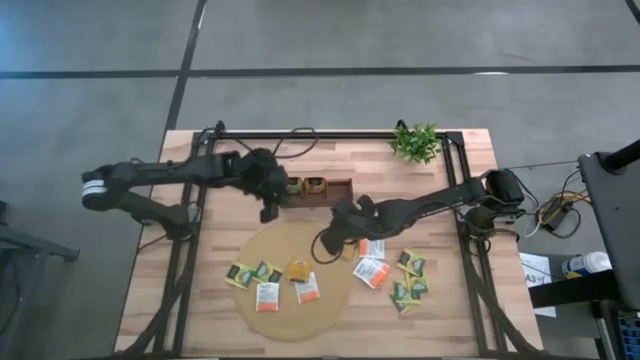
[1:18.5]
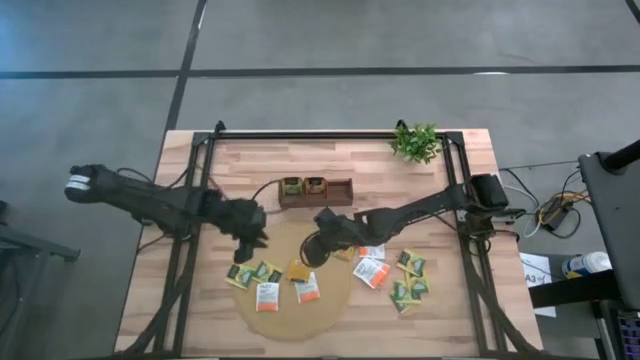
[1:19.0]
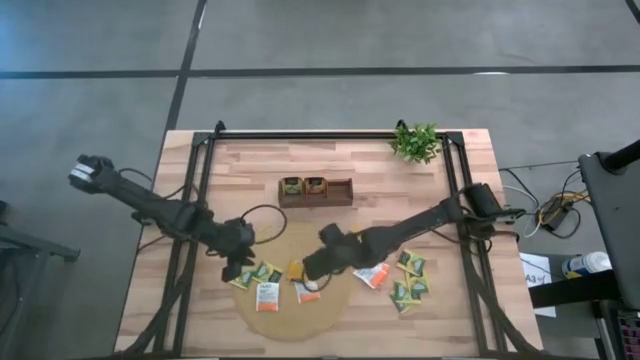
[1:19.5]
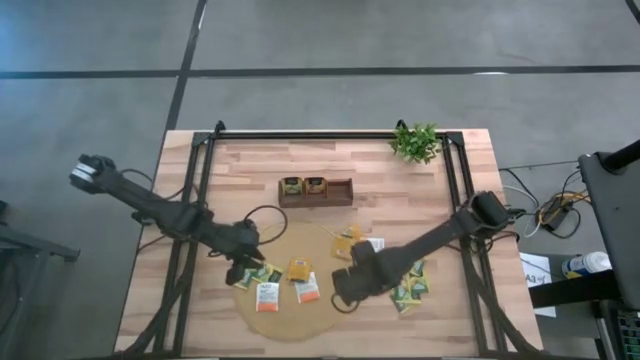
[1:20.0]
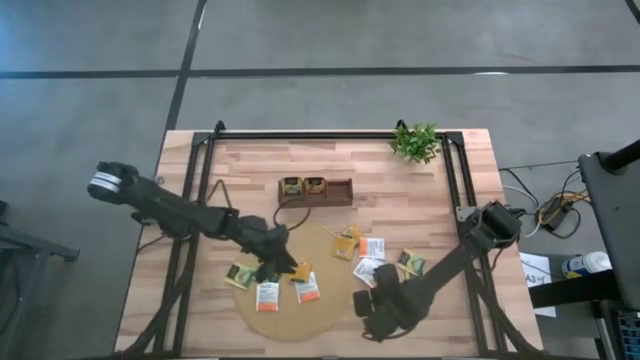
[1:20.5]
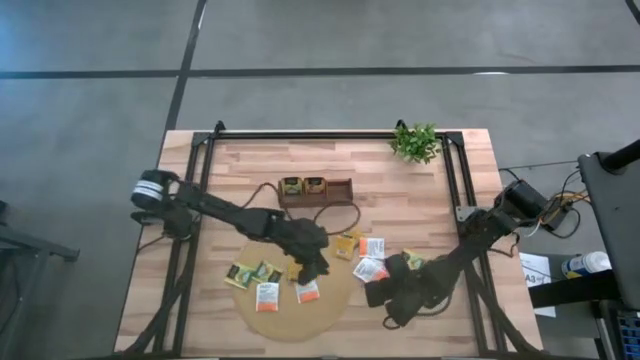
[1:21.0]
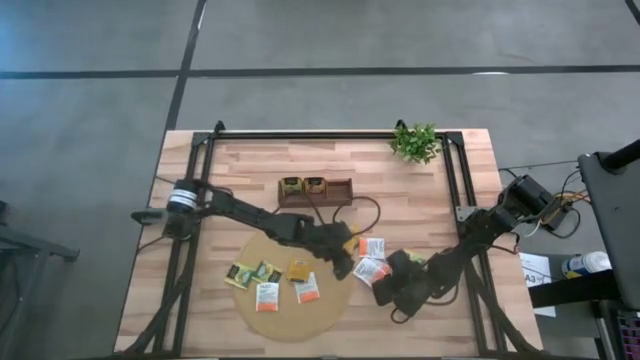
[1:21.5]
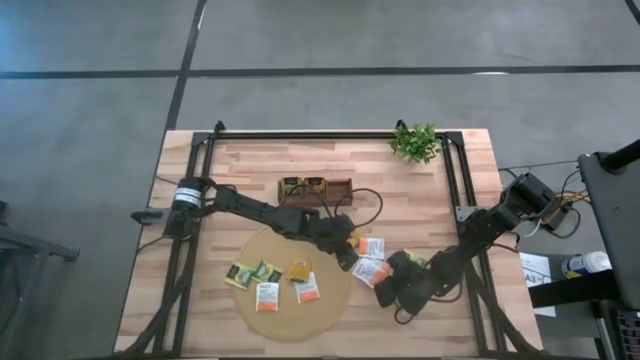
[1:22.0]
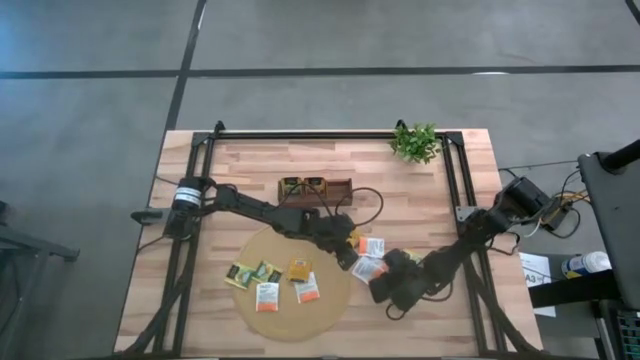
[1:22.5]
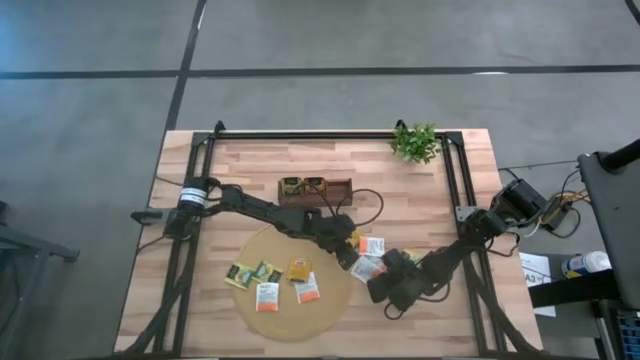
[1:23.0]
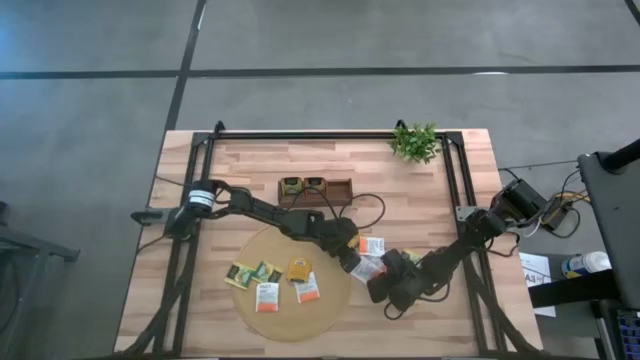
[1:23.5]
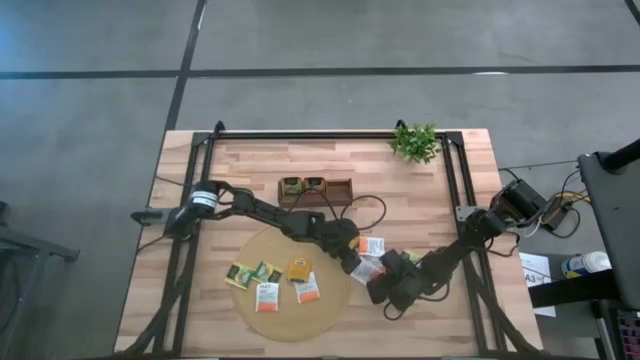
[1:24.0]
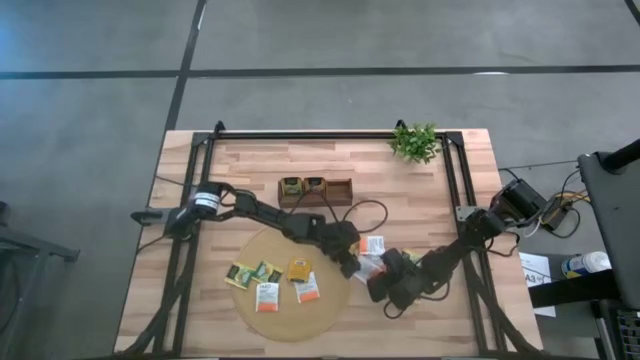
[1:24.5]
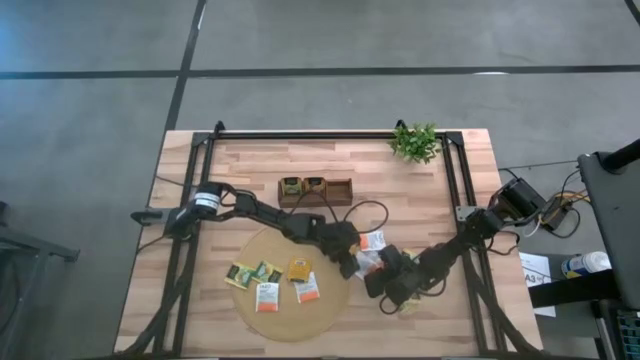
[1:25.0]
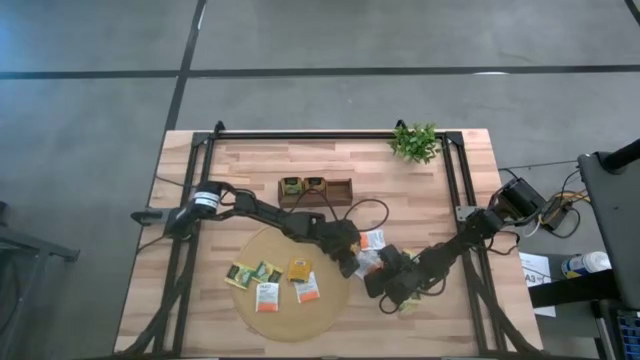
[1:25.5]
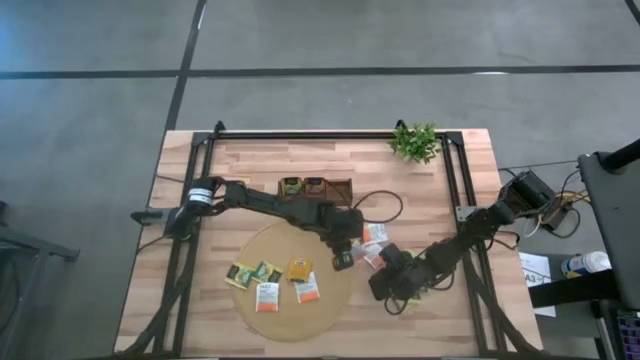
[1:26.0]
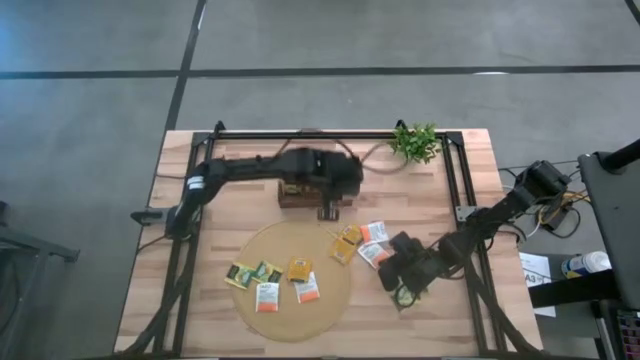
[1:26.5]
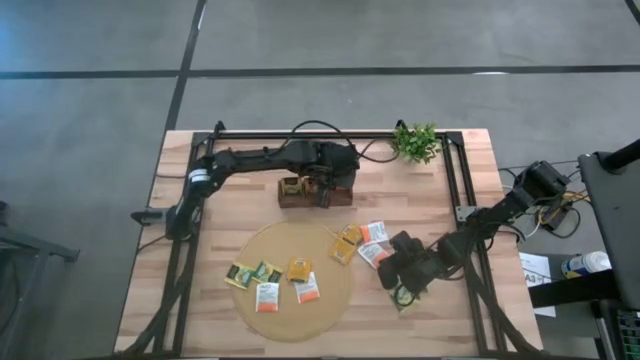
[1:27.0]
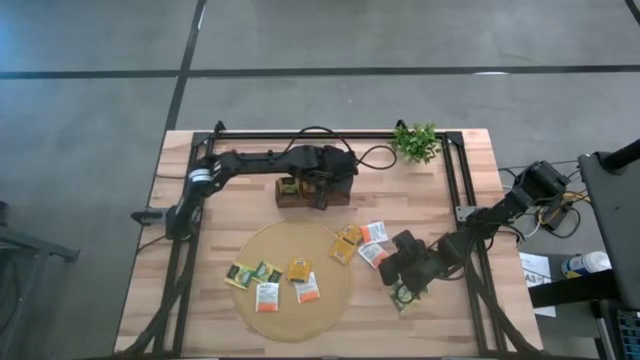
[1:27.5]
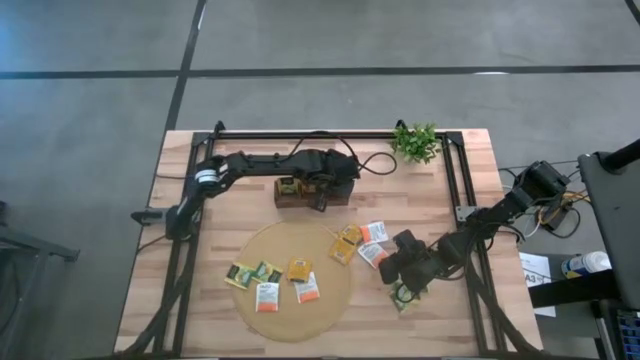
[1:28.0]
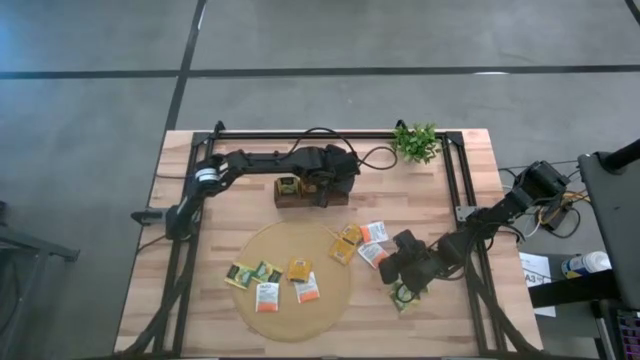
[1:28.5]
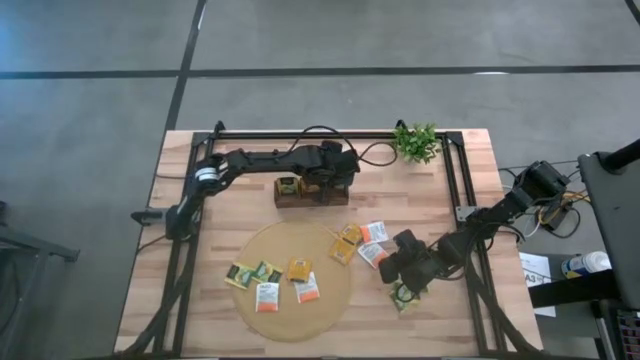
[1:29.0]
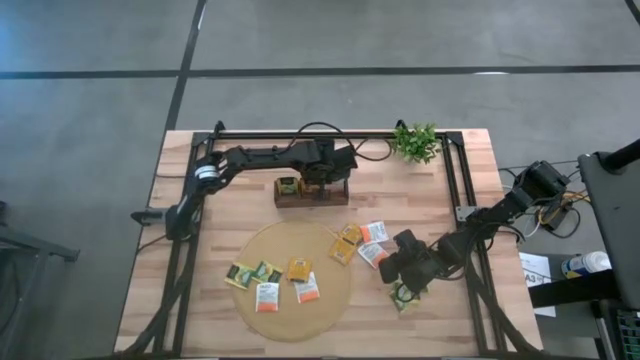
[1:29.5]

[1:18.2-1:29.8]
Task: Pick & Place Tea
Put the orange tea bag into the right section of the wooden organizer

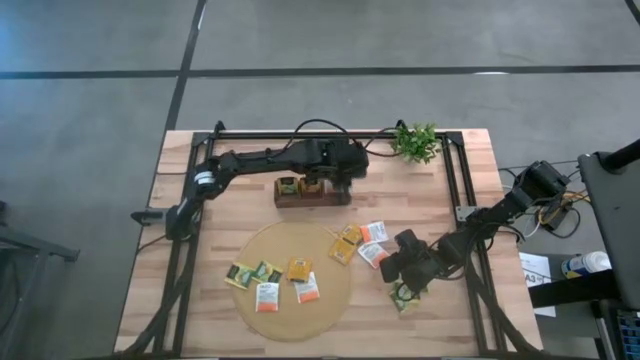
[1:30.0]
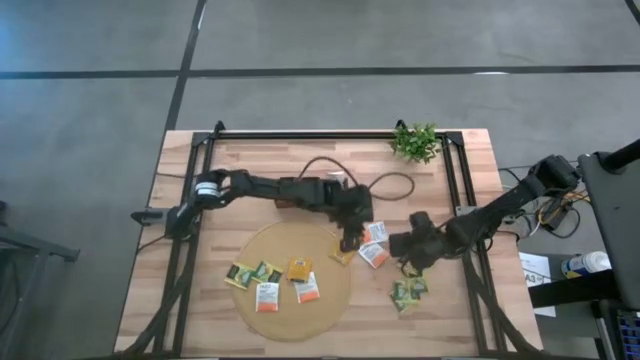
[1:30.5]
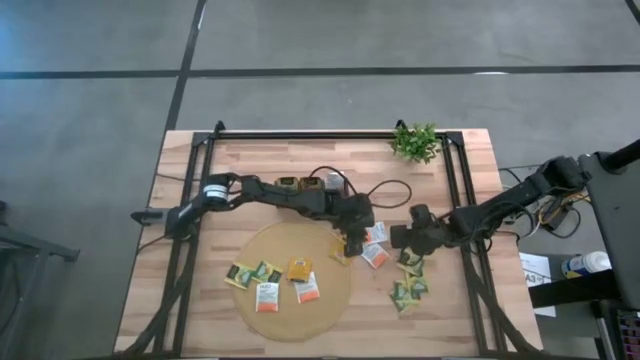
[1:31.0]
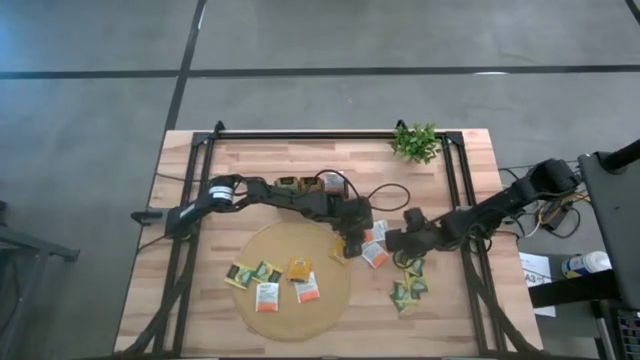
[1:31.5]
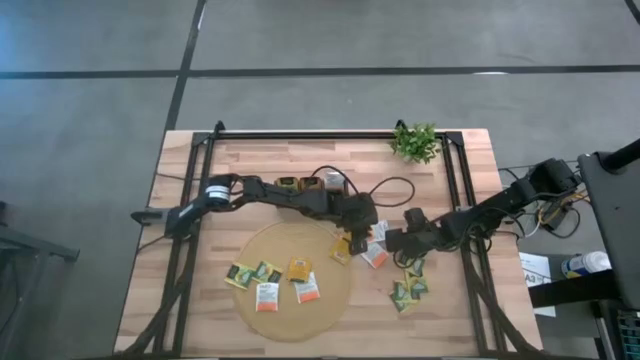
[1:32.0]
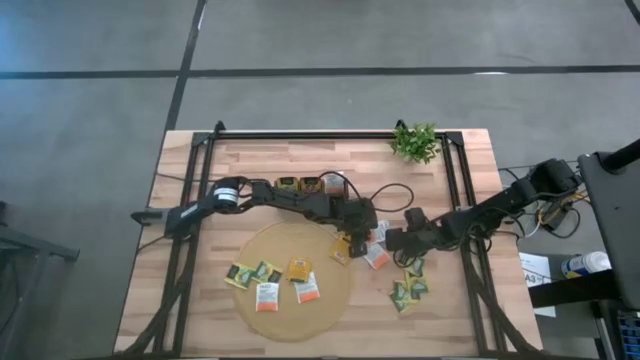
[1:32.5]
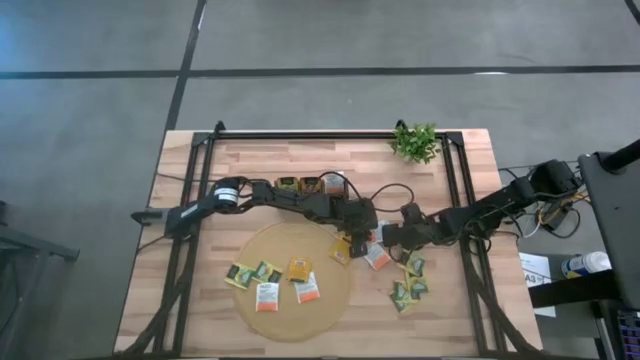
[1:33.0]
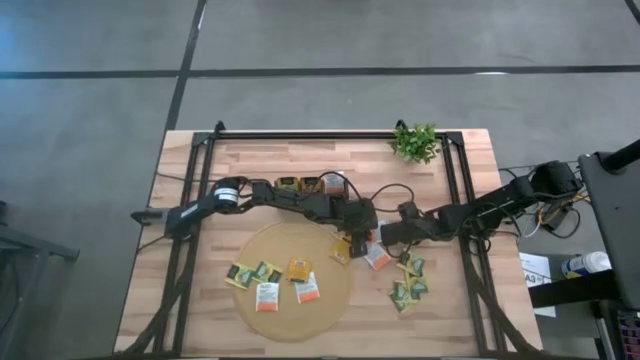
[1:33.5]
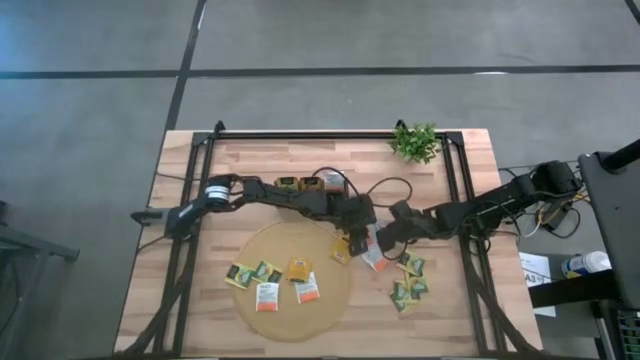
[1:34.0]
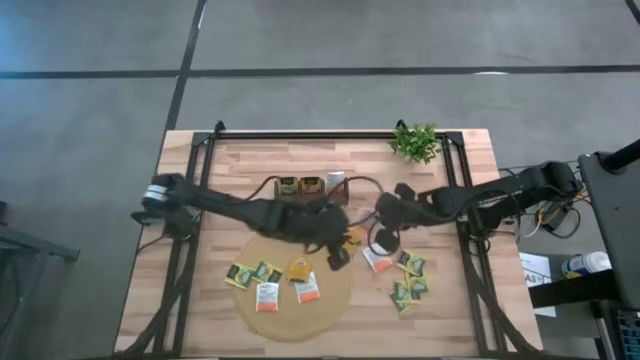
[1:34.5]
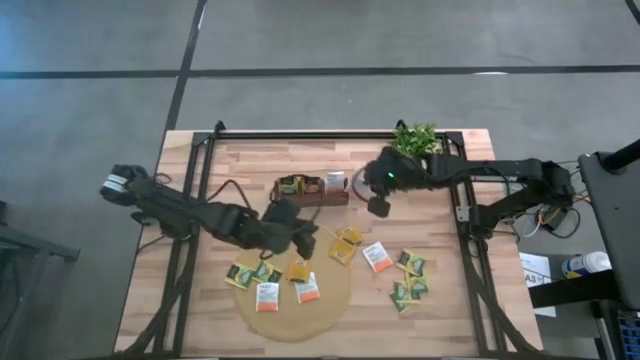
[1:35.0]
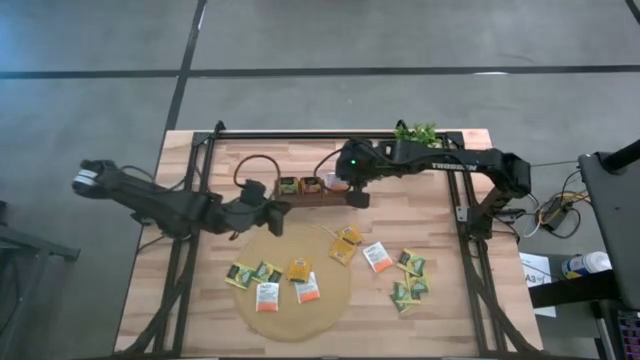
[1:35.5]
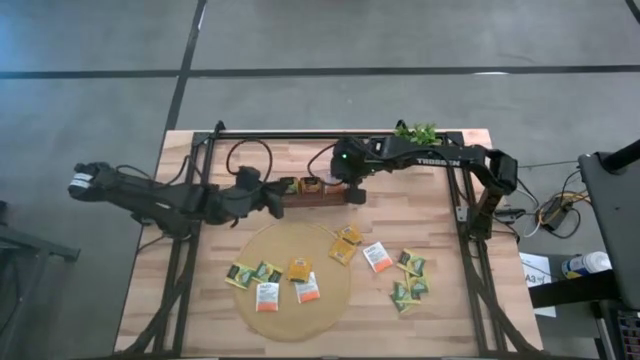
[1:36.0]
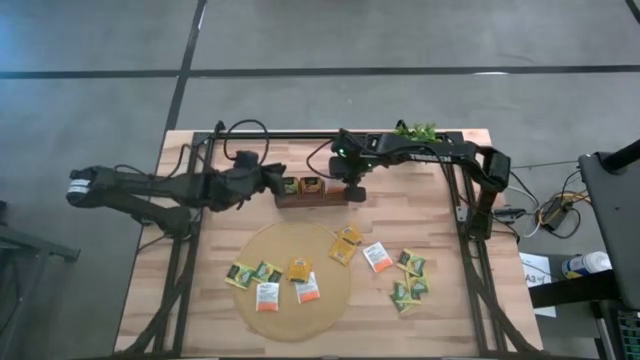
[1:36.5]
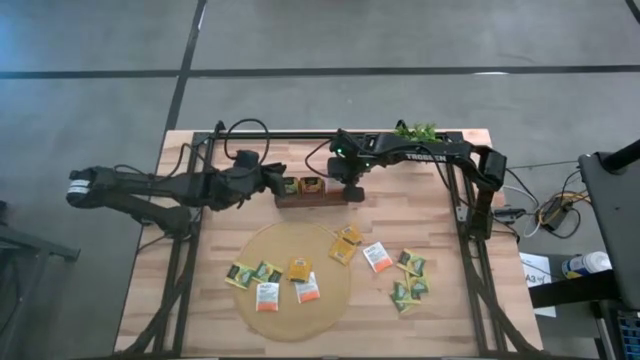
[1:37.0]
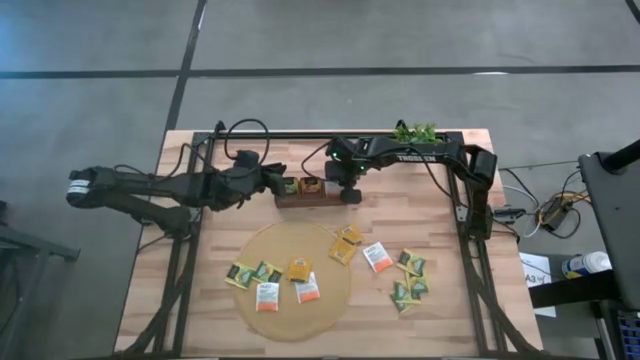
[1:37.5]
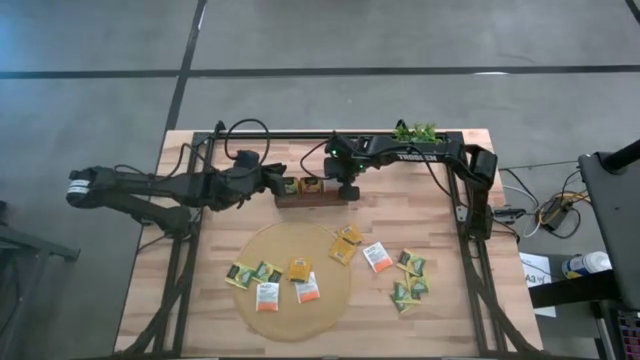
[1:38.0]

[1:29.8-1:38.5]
Put the orange tea bag into the right section of the wooden organizer

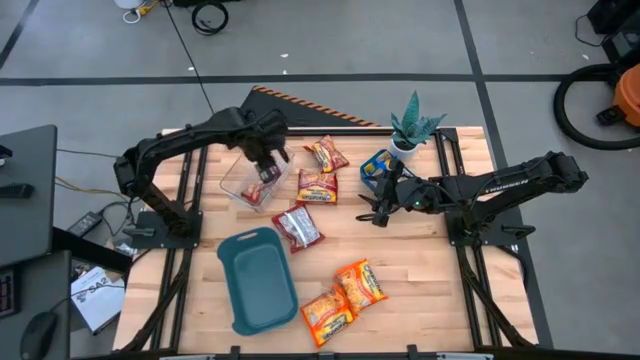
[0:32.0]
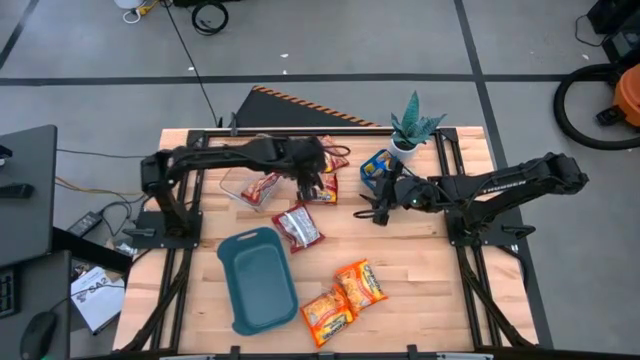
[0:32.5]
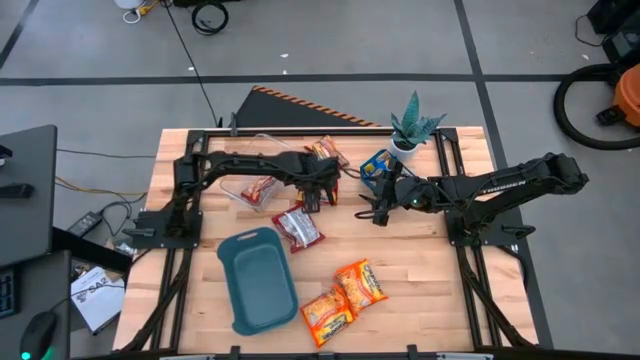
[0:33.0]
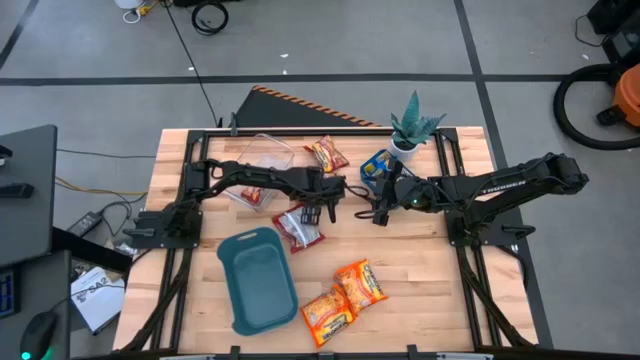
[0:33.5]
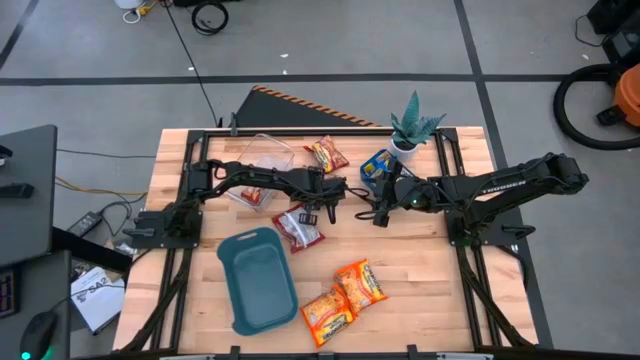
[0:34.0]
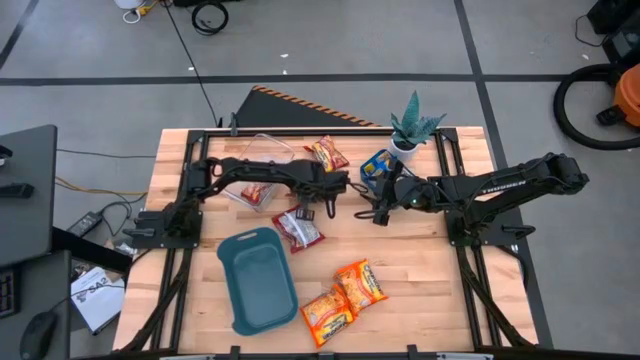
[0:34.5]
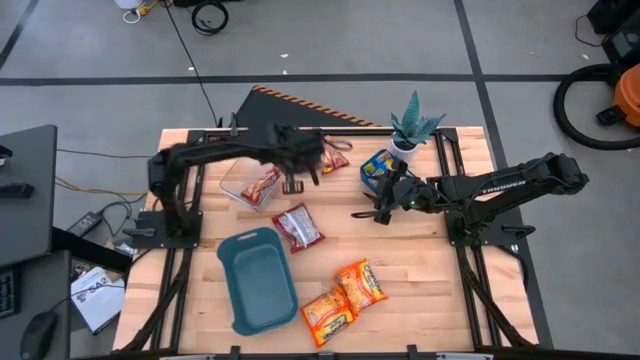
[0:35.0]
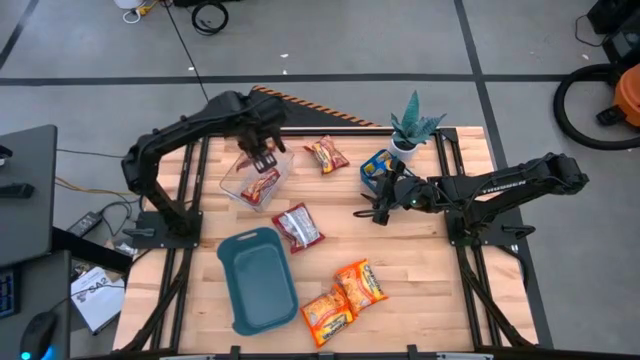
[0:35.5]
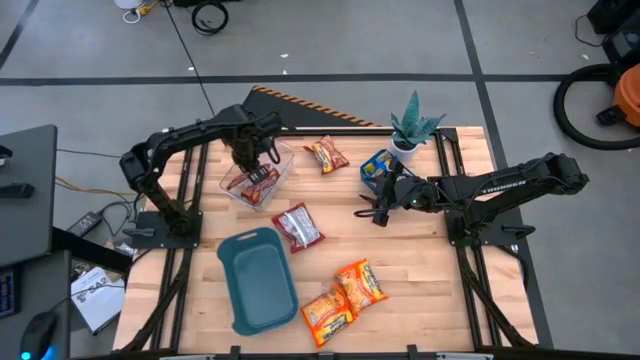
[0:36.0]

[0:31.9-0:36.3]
Task: Sort Maruchan noodles
Put the red noodle pack into the transparent bin
